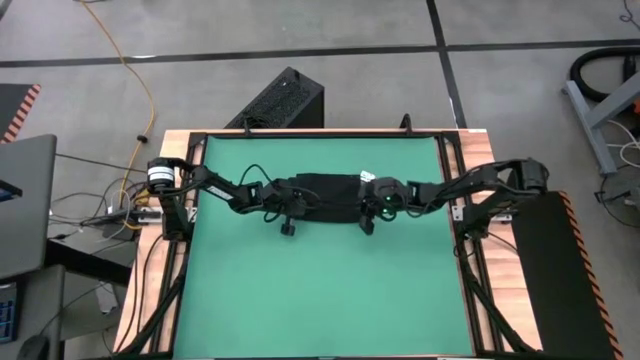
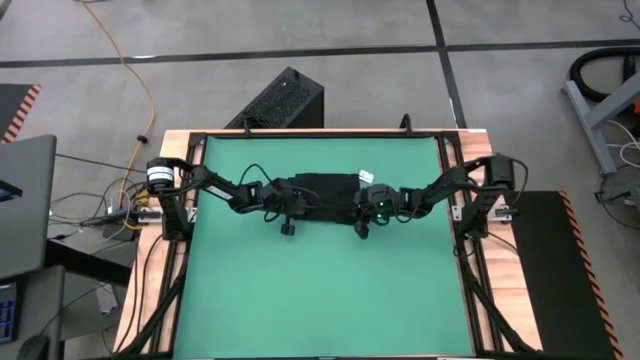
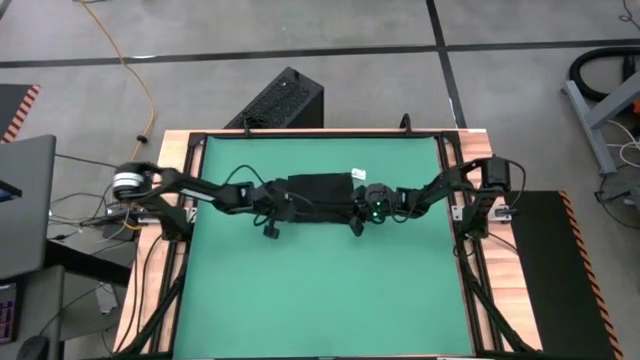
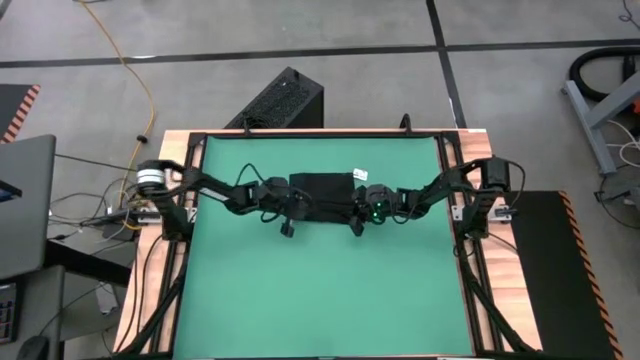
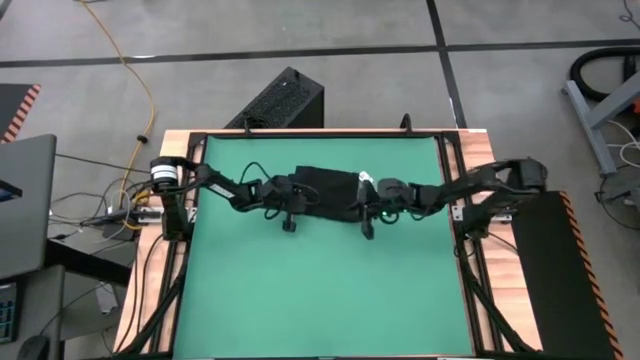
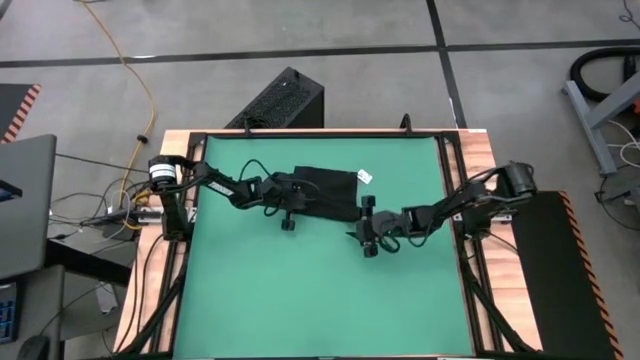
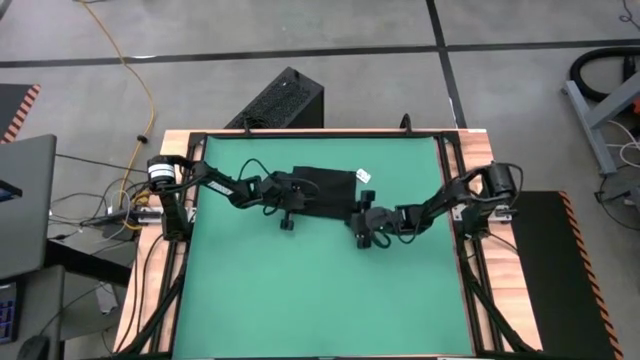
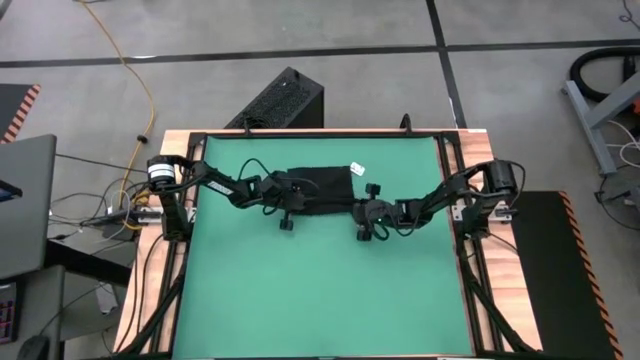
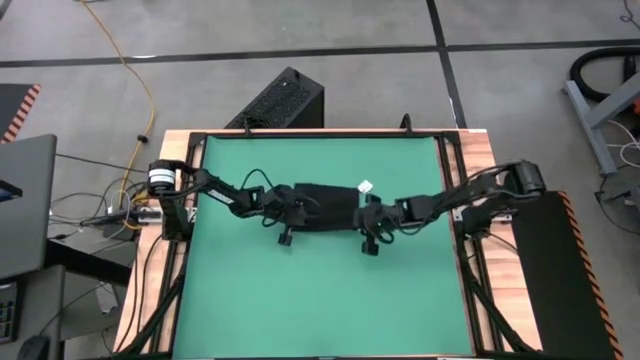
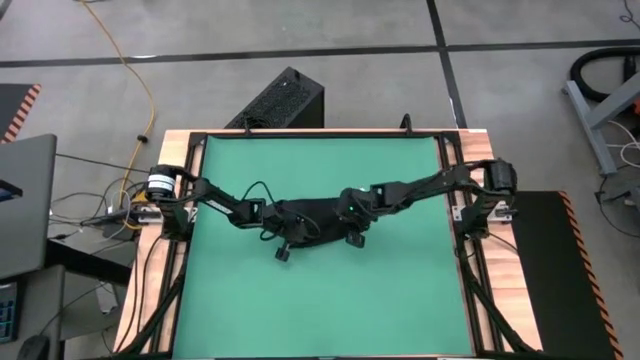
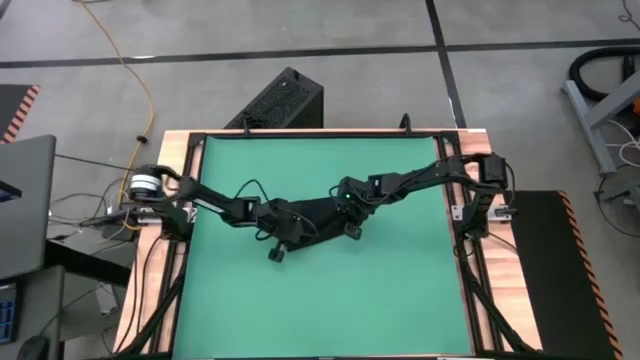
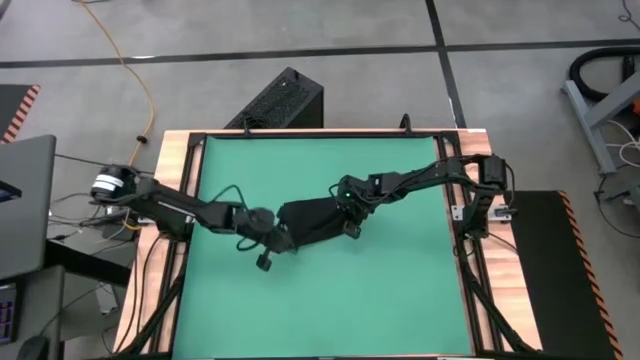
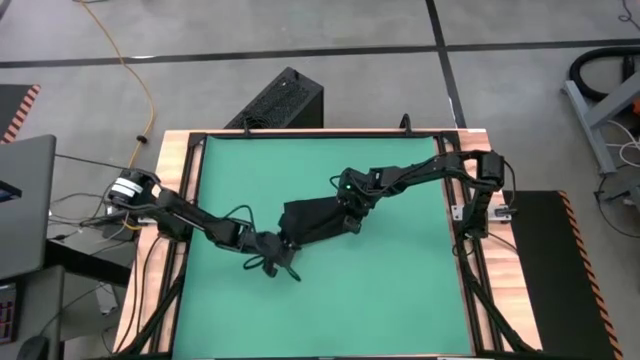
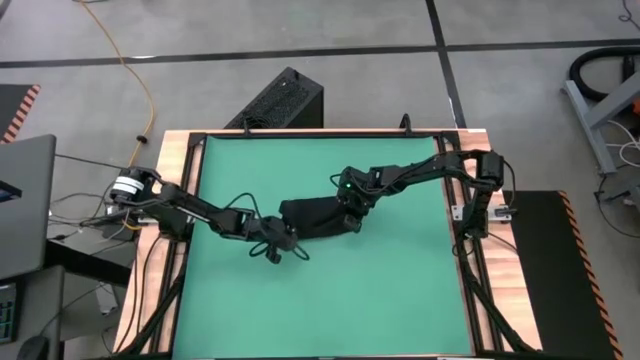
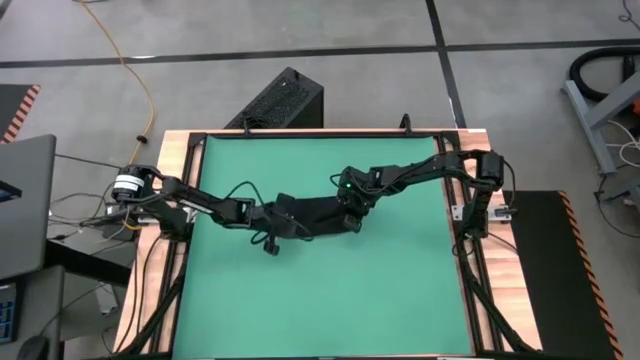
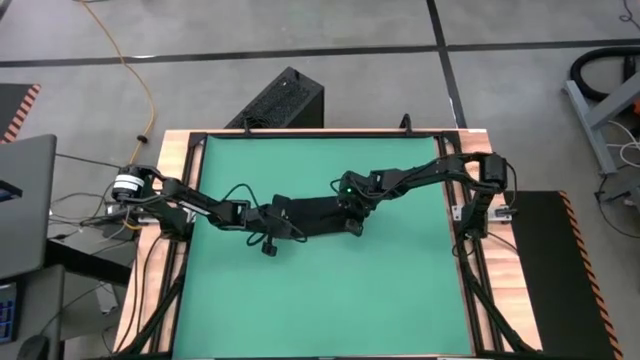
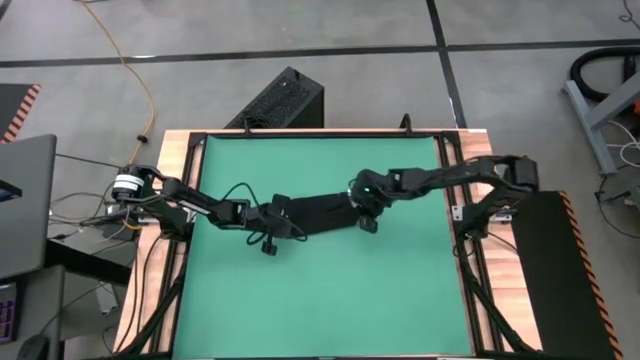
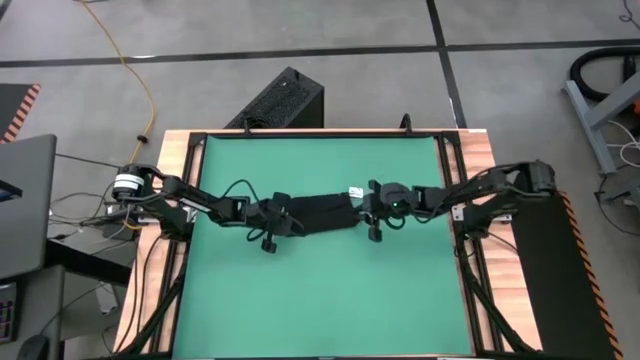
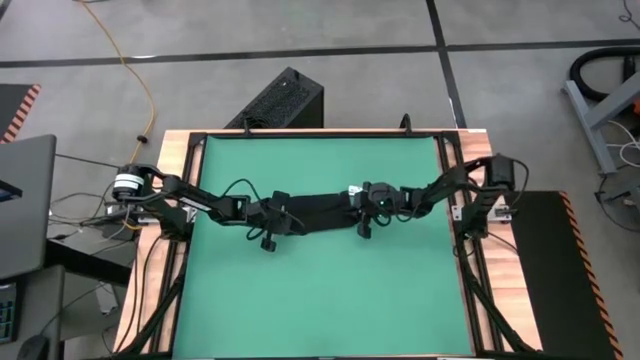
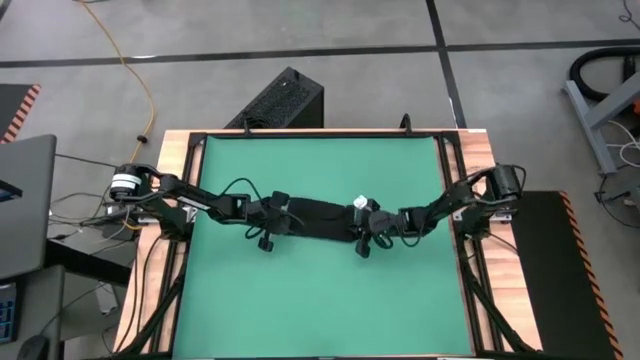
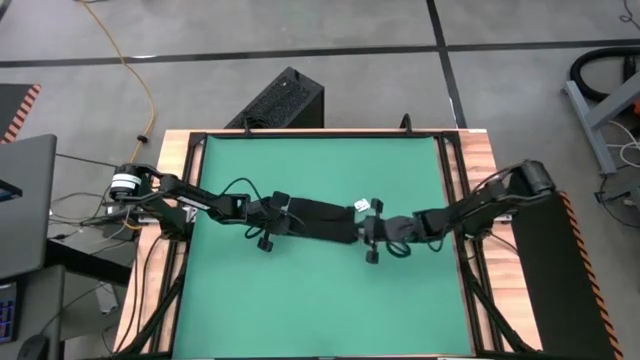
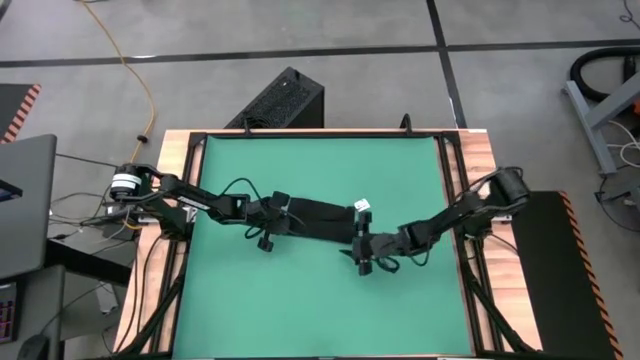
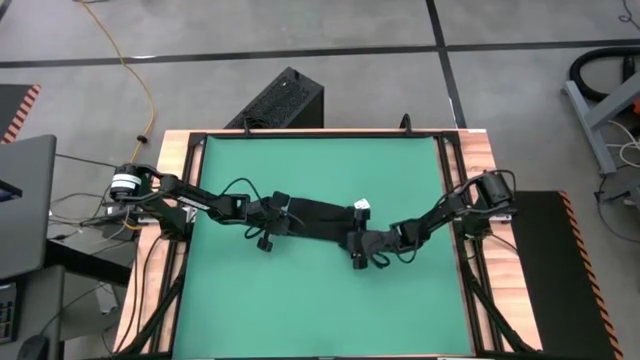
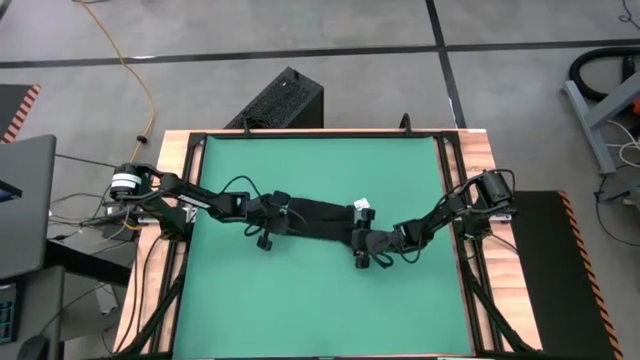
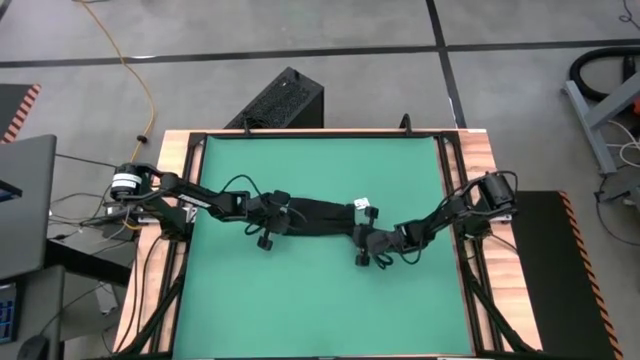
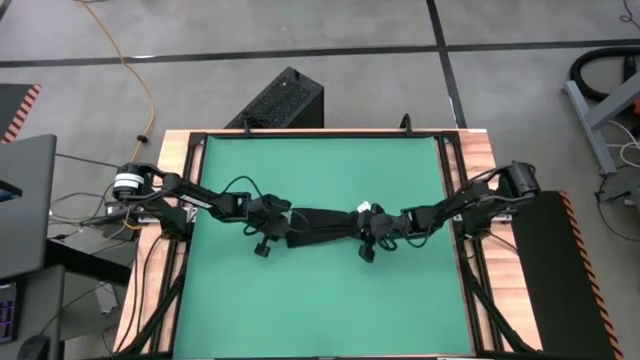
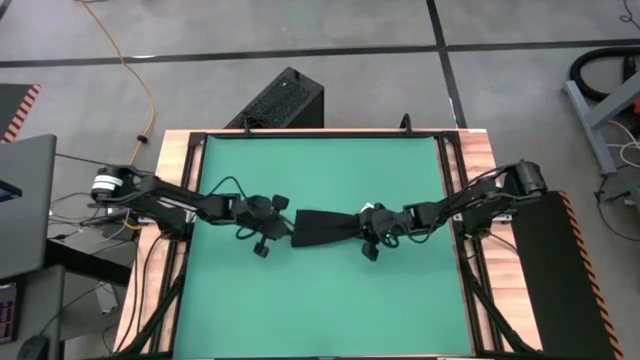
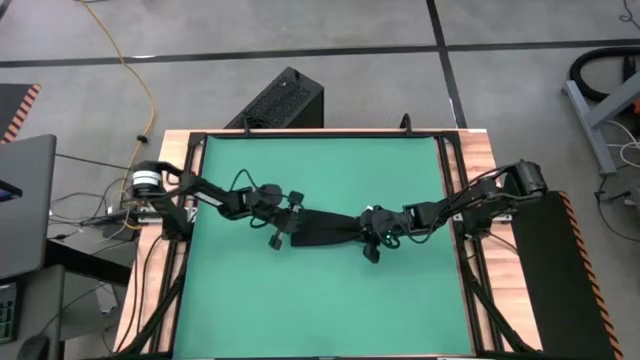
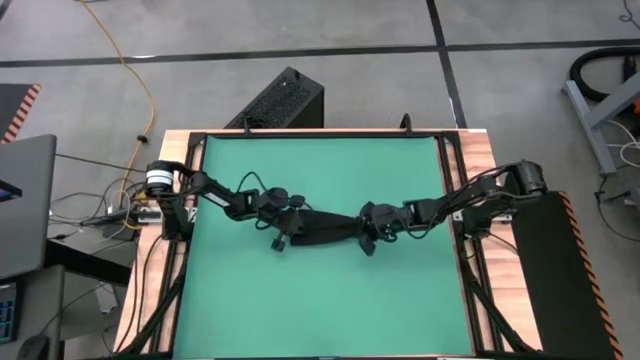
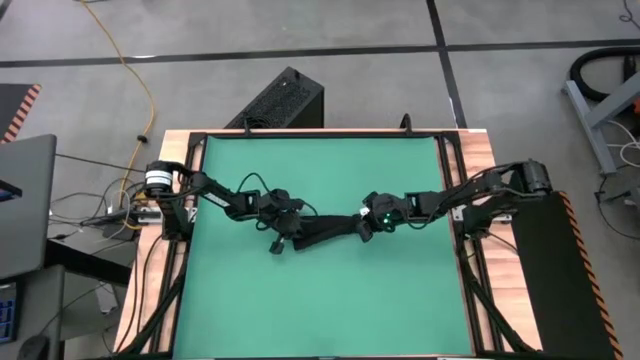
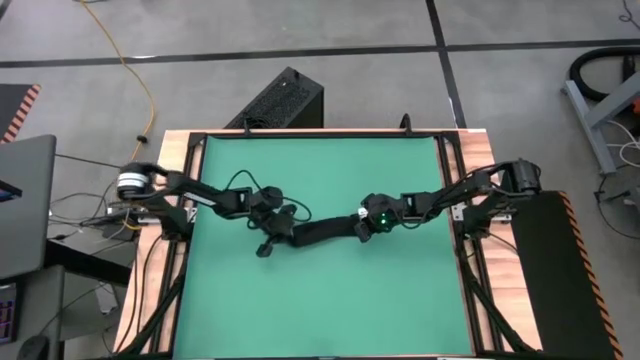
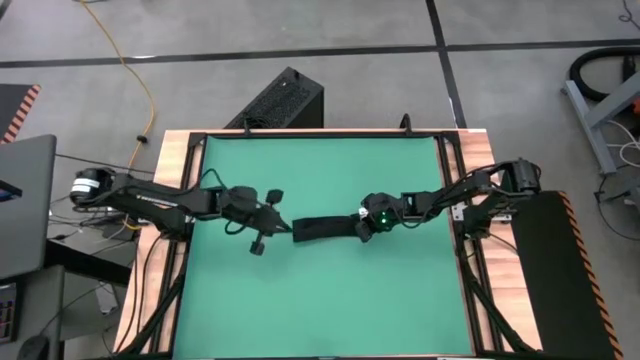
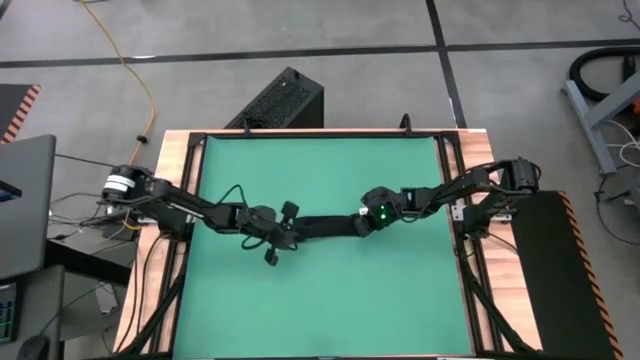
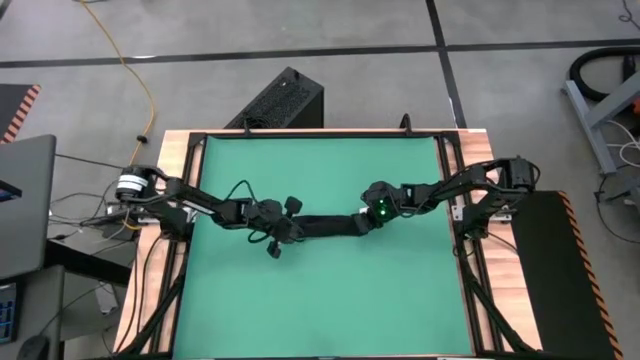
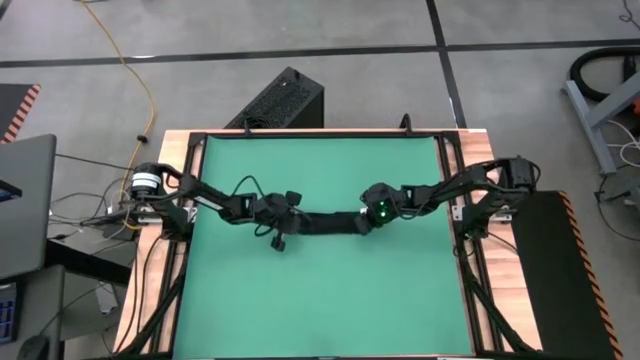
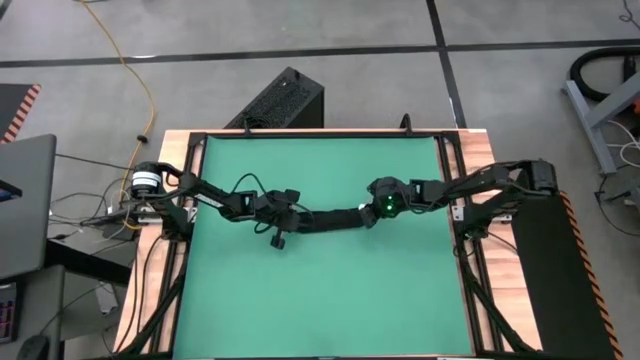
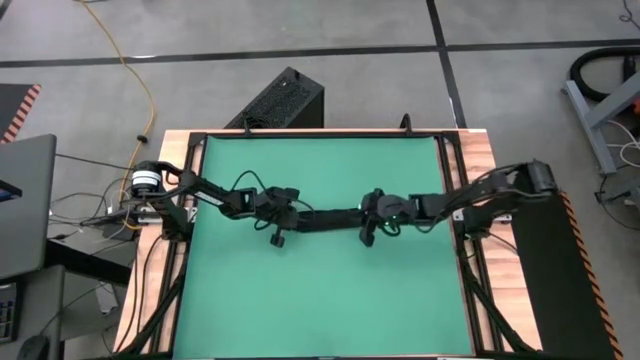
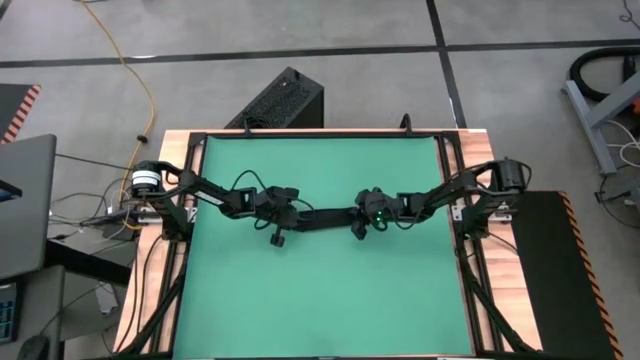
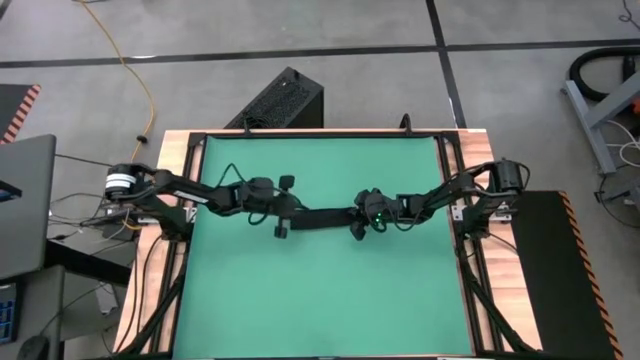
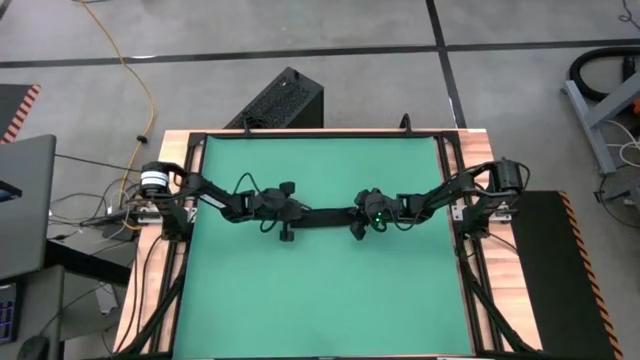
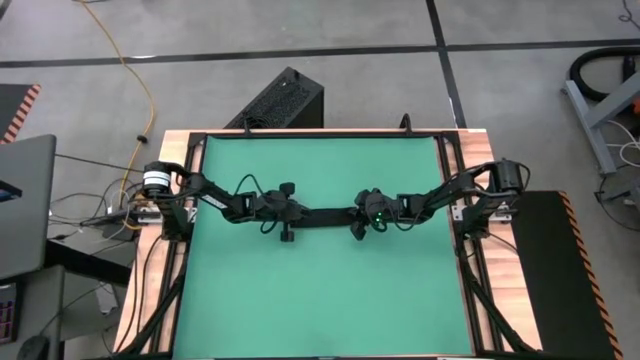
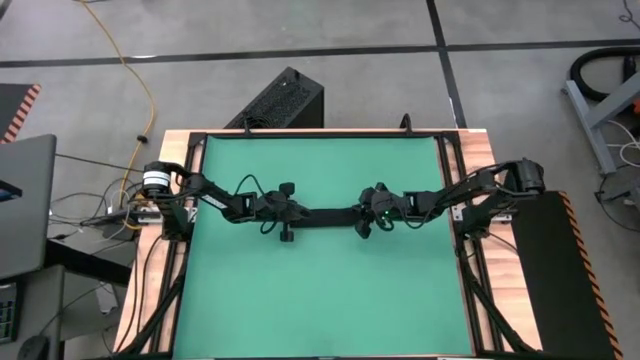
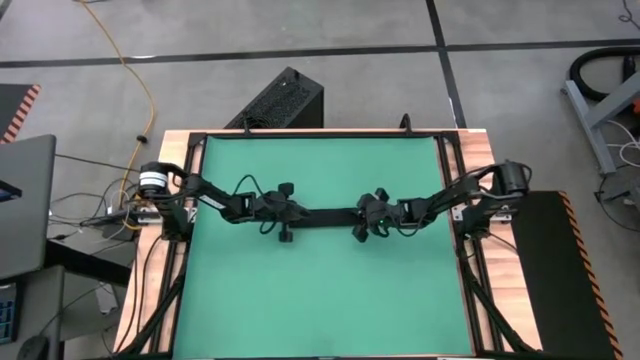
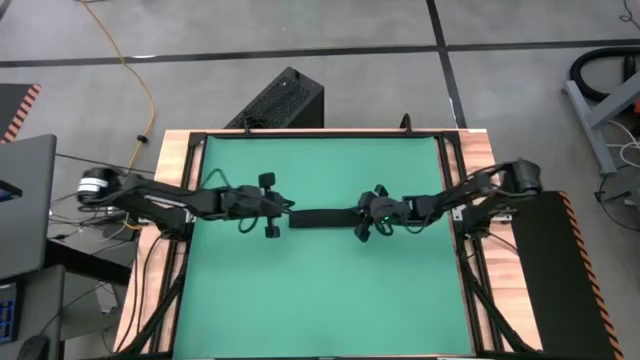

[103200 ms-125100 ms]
Task: Roll towel
Roll the black towel
